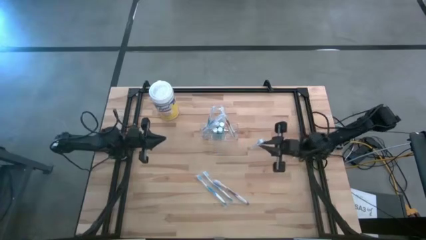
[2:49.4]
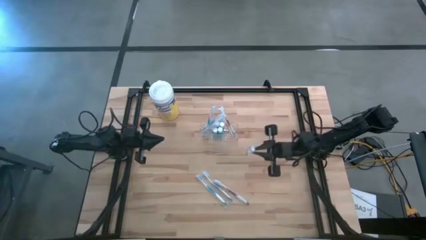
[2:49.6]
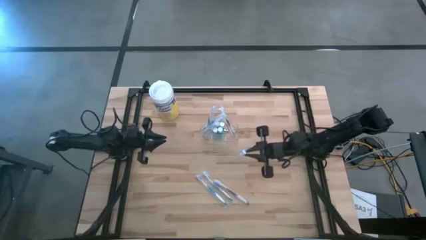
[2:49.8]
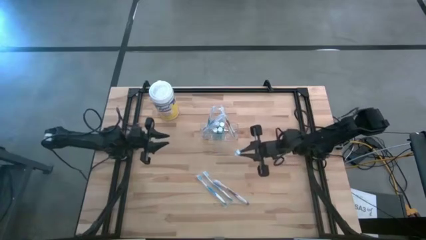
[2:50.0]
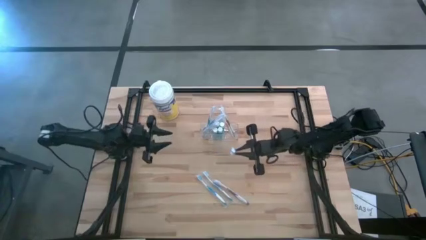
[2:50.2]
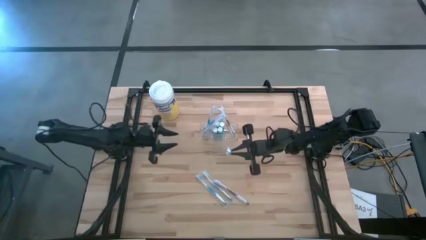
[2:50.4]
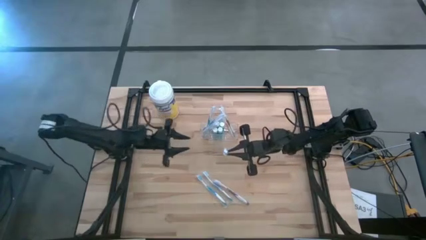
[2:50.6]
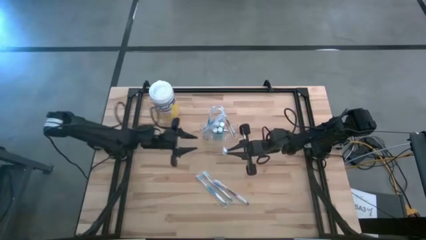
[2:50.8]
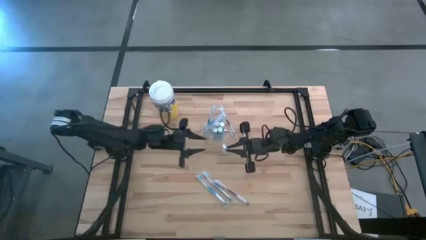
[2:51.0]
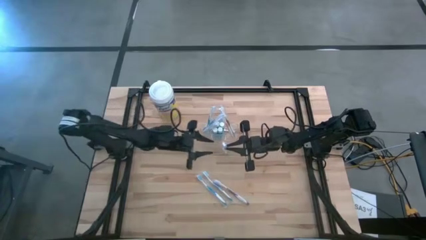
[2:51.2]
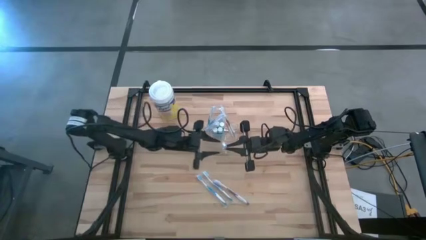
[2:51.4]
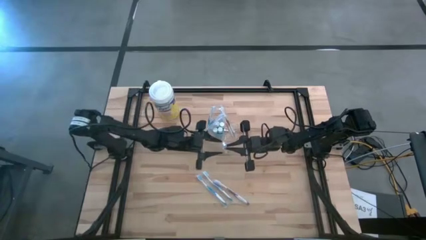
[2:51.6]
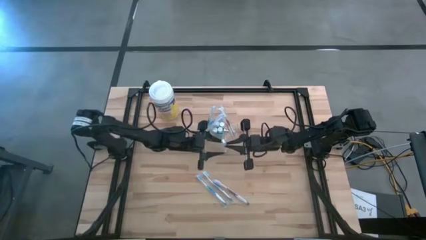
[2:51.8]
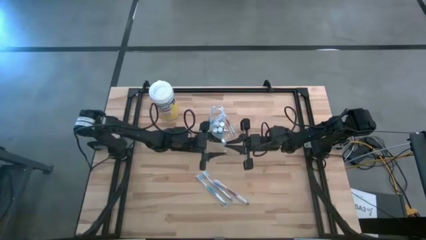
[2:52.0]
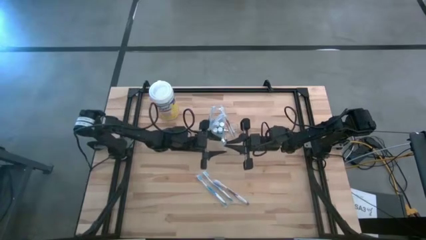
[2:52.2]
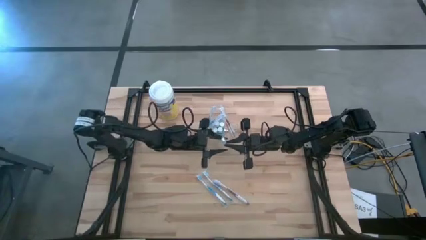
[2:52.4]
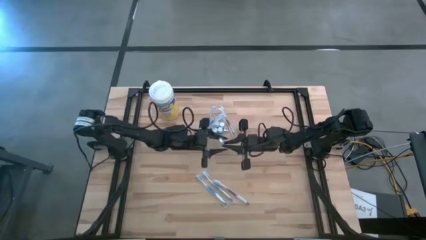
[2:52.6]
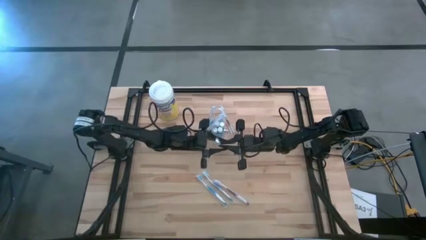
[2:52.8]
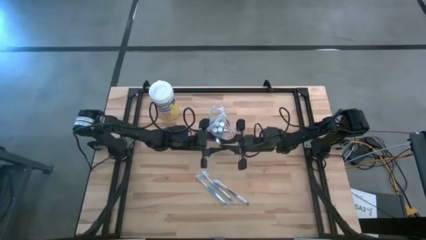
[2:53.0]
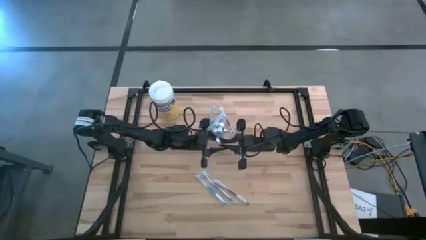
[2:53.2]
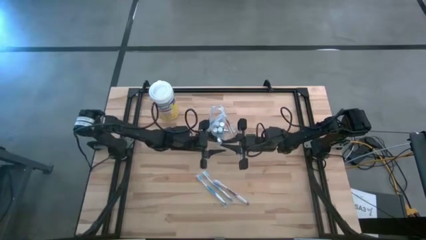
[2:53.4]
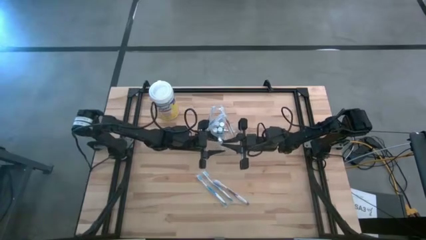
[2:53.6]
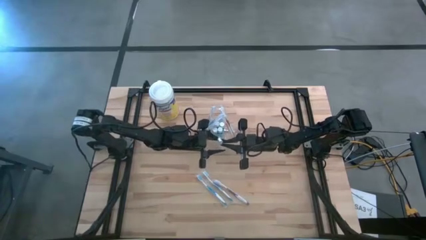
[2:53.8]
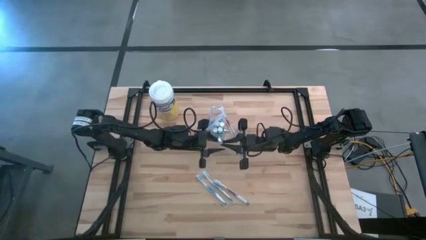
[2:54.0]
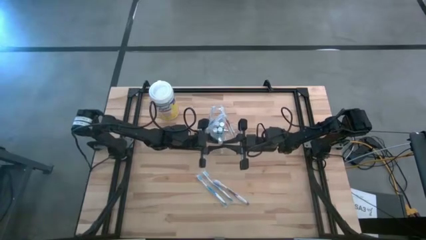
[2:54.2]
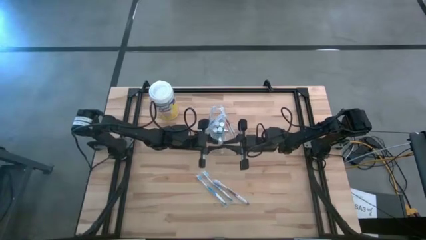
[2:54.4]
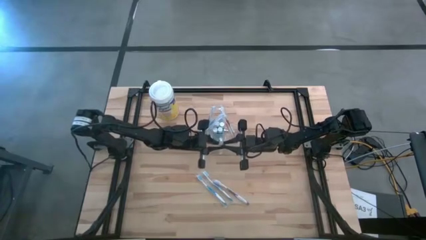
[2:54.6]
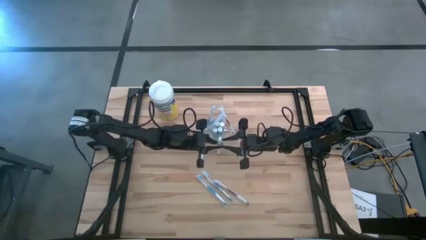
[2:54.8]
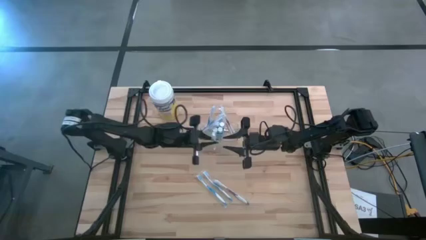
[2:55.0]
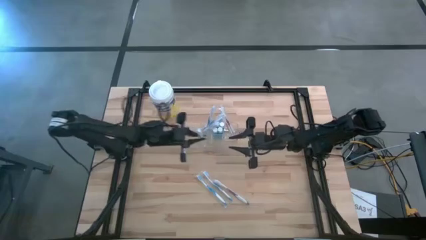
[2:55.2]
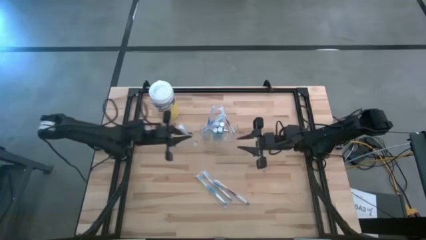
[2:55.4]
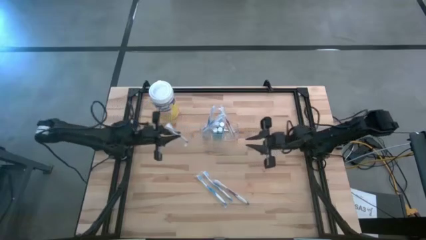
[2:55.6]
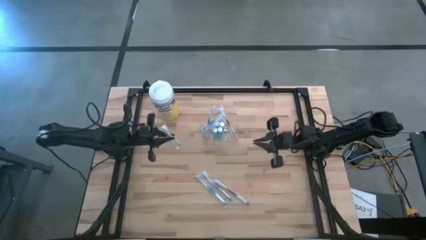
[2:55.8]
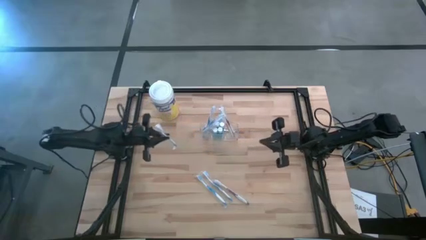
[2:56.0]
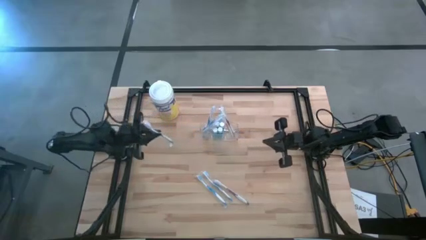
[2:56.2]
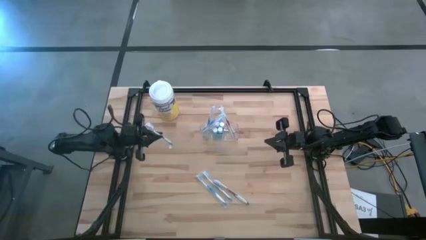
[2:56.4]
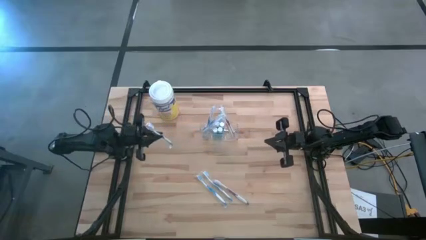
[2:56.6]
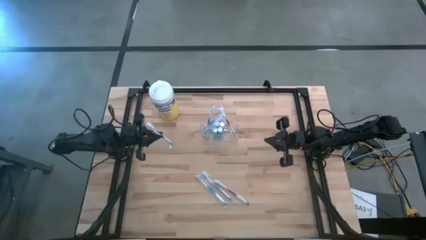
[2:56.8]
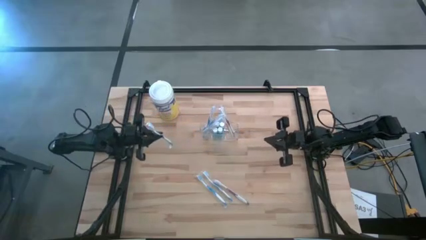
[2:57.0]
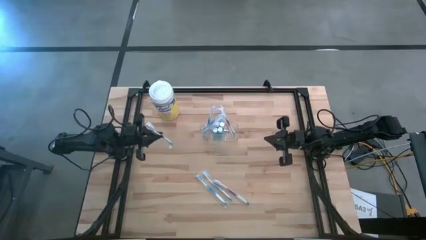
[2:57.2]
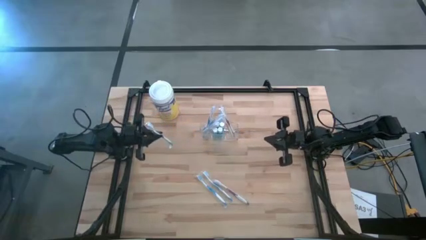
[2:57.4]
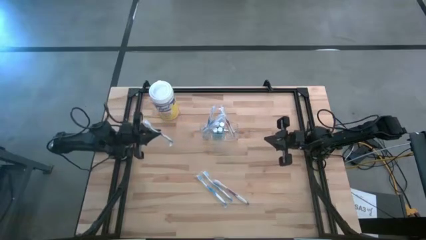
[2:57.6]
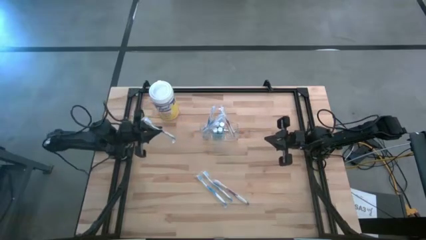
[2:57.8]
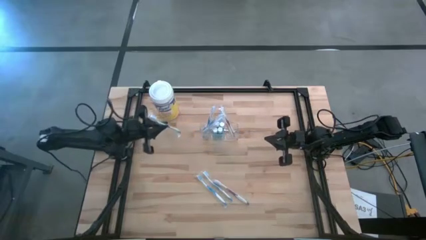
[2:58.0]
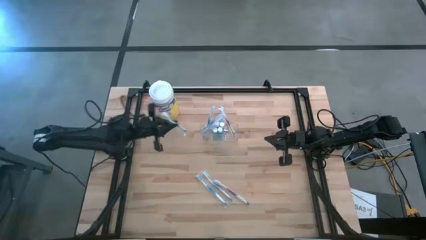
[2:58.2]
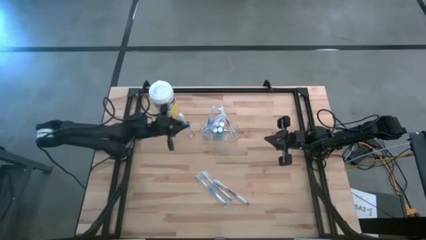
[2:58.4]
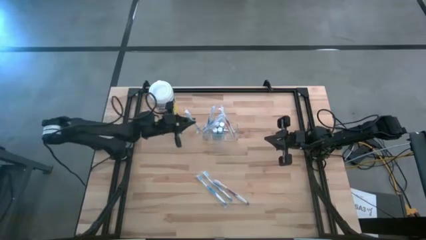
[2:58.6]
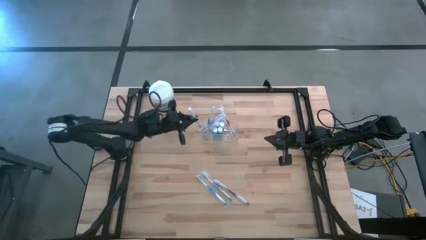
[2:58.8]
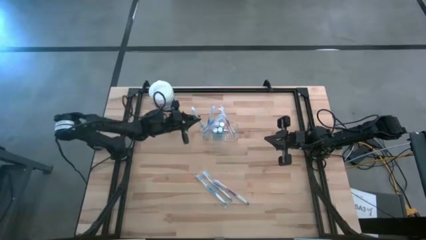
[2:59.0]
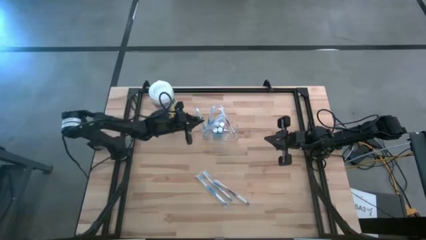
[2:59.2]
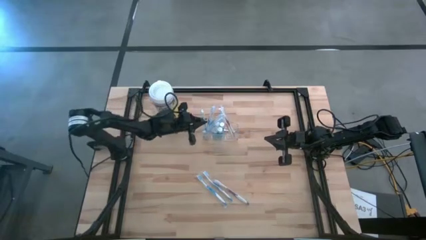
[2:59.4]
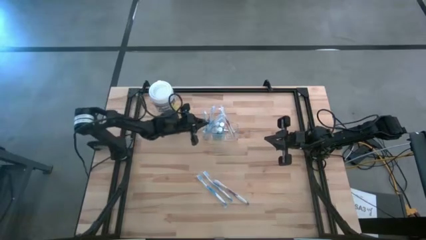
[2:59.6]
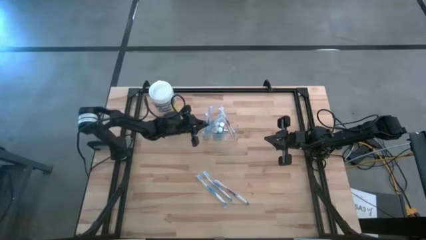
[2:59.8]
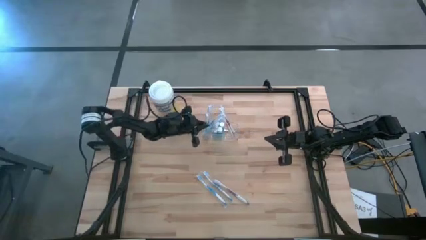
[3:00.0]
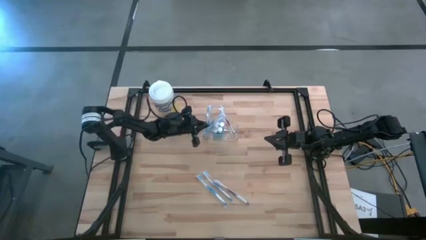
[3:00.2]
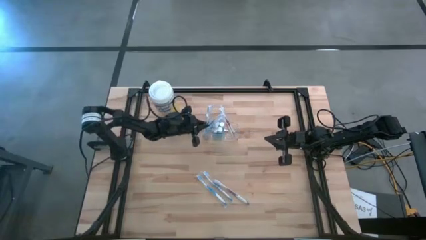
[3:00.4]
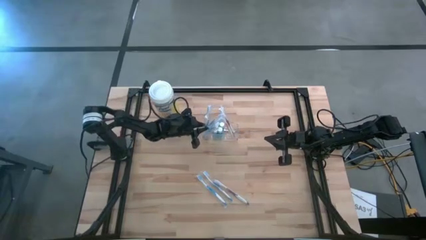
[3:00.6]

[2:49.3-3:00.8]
Task: Pick & Place toothbrushing station
Put the blue toothbrush into the left section of the transparent organizer
